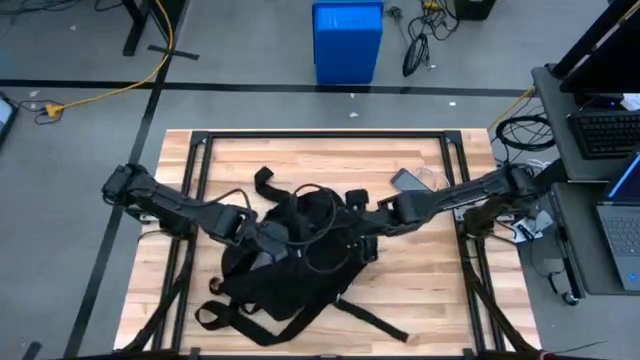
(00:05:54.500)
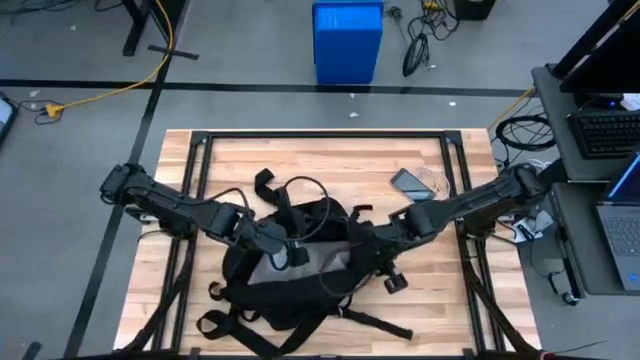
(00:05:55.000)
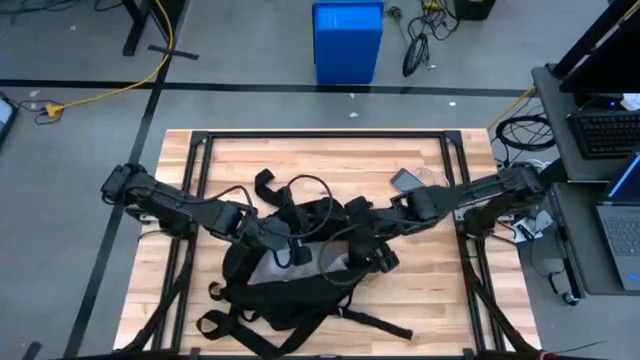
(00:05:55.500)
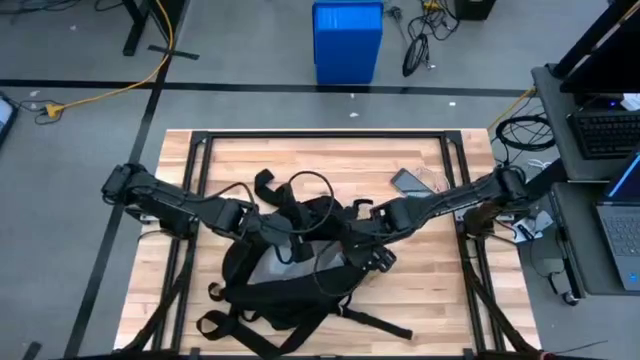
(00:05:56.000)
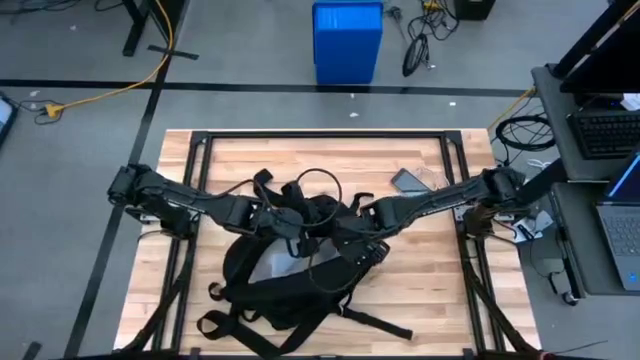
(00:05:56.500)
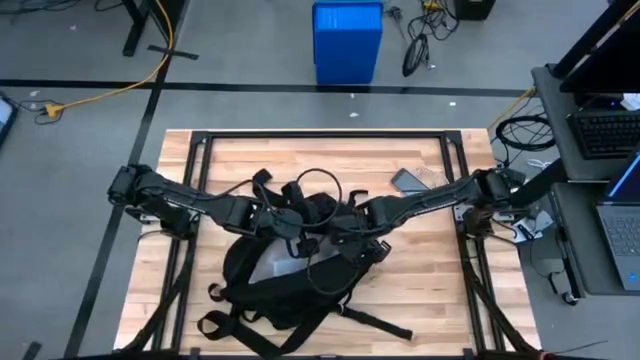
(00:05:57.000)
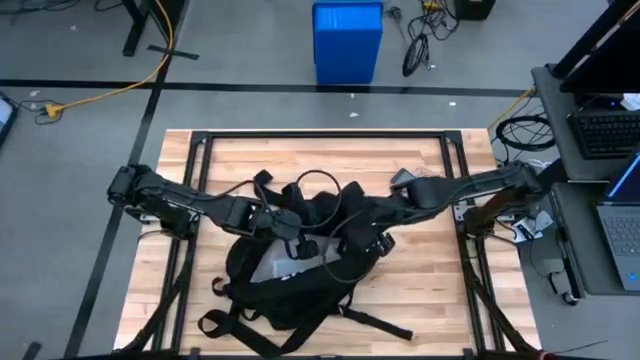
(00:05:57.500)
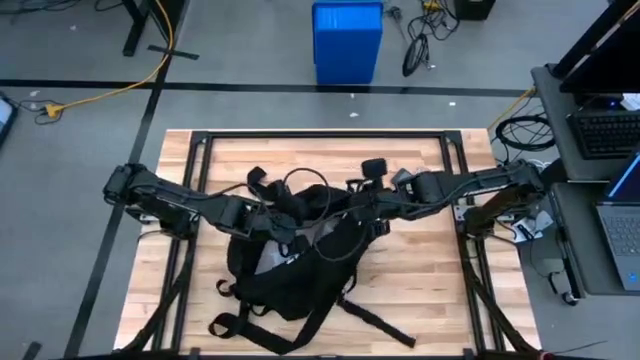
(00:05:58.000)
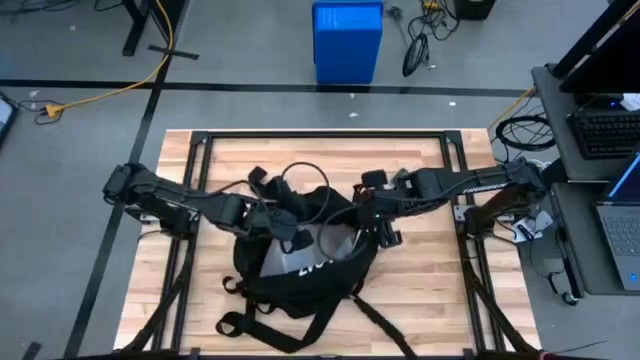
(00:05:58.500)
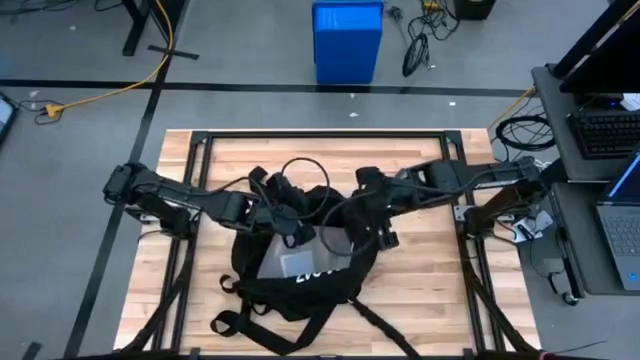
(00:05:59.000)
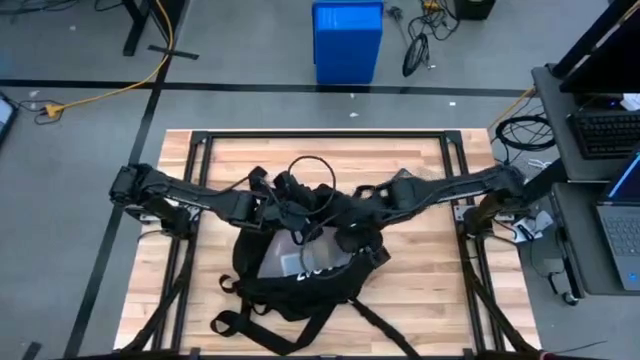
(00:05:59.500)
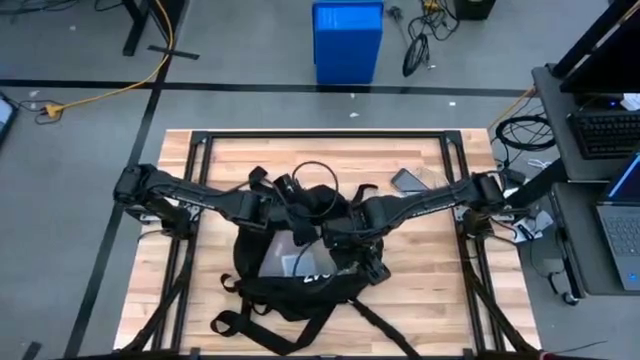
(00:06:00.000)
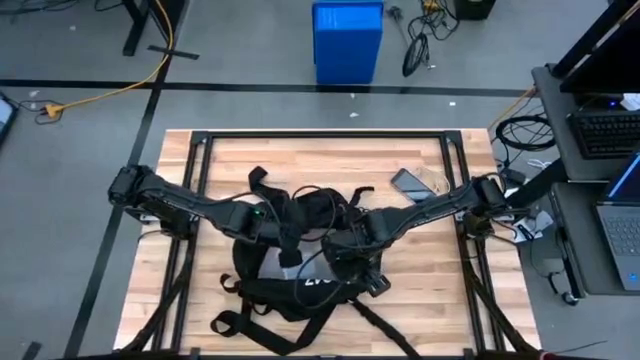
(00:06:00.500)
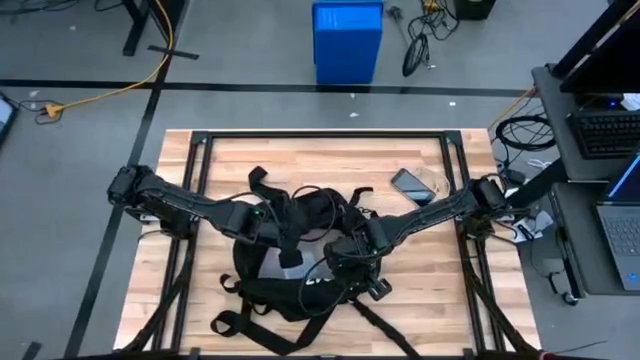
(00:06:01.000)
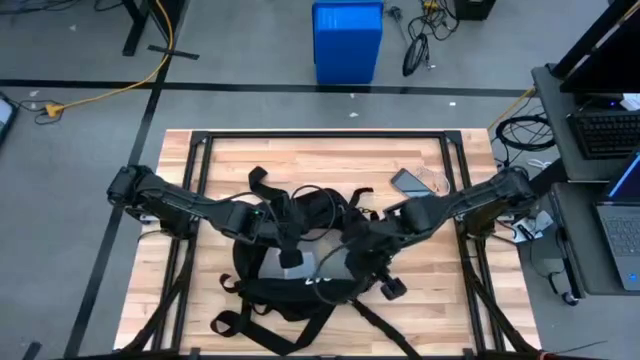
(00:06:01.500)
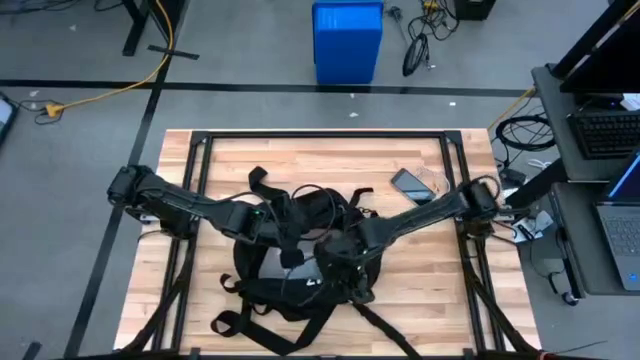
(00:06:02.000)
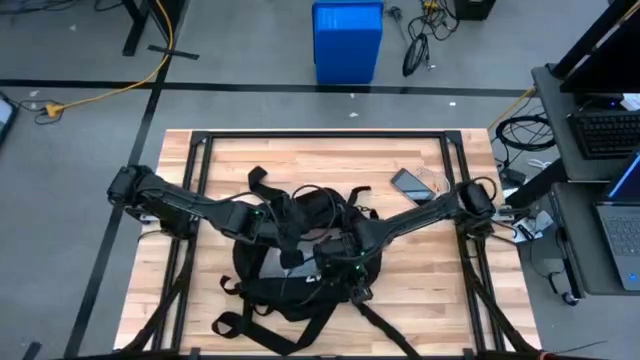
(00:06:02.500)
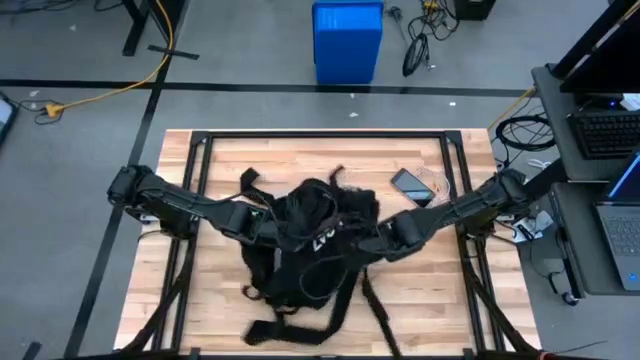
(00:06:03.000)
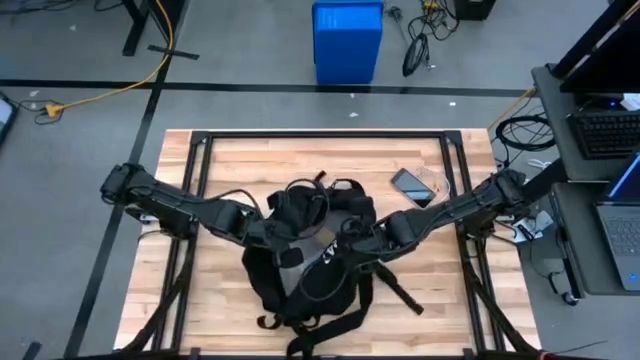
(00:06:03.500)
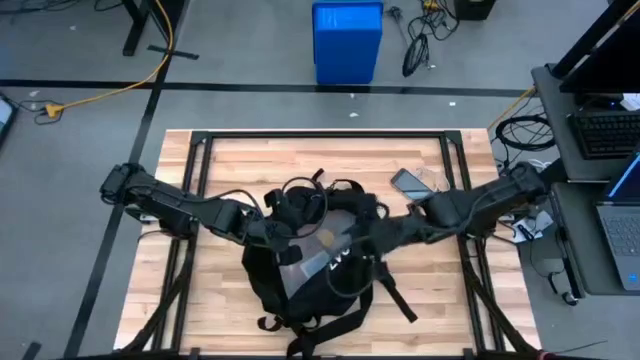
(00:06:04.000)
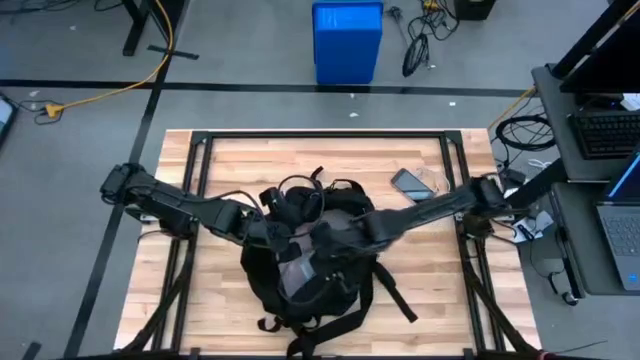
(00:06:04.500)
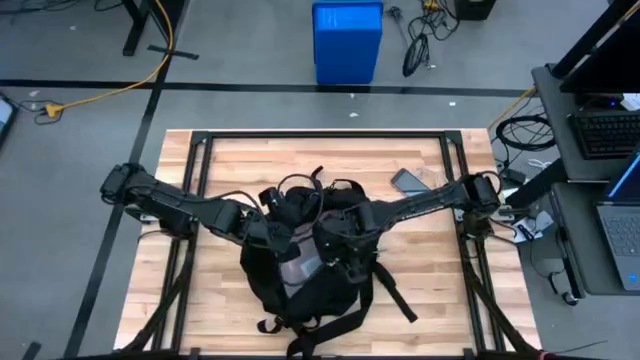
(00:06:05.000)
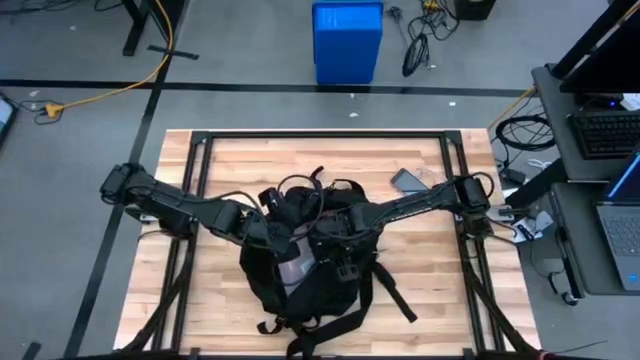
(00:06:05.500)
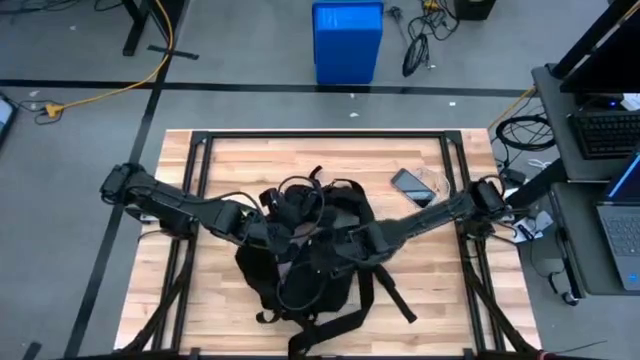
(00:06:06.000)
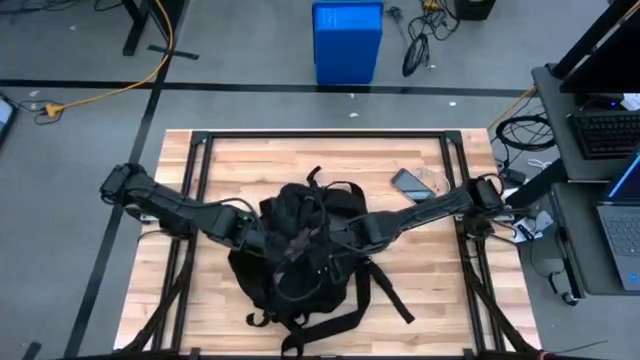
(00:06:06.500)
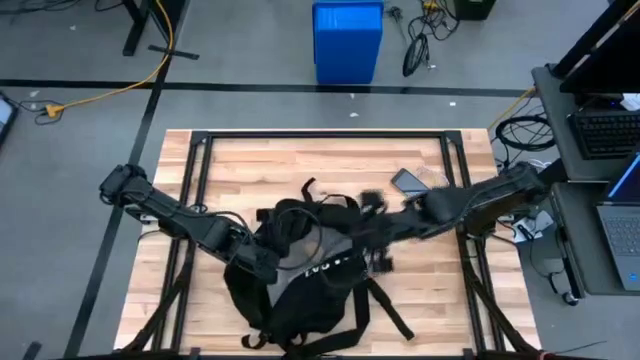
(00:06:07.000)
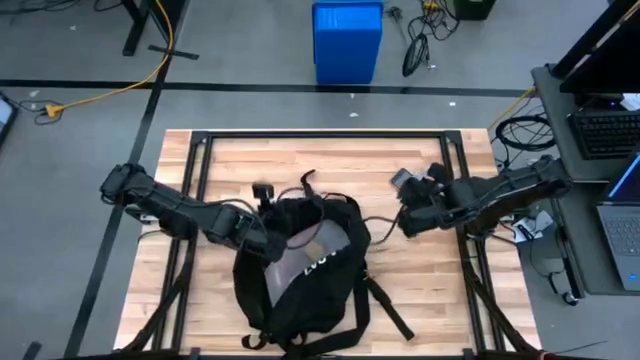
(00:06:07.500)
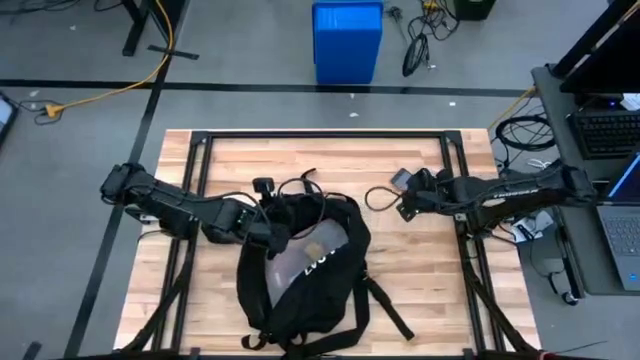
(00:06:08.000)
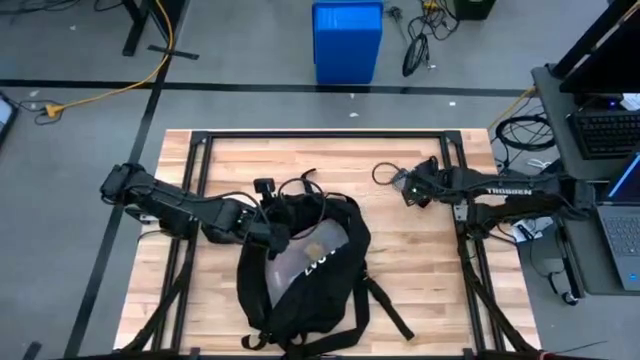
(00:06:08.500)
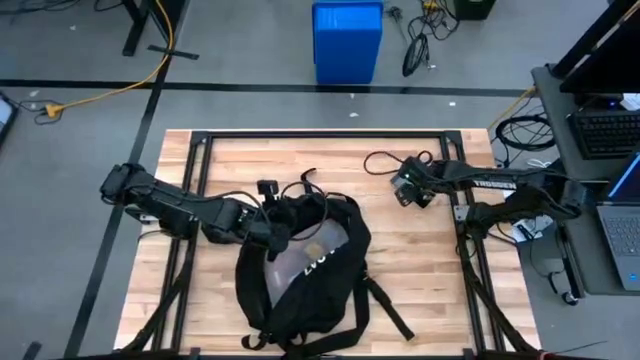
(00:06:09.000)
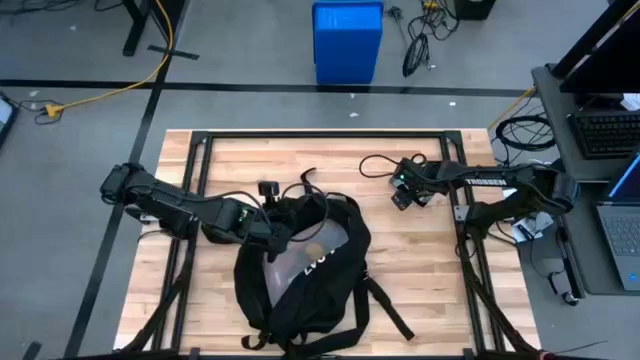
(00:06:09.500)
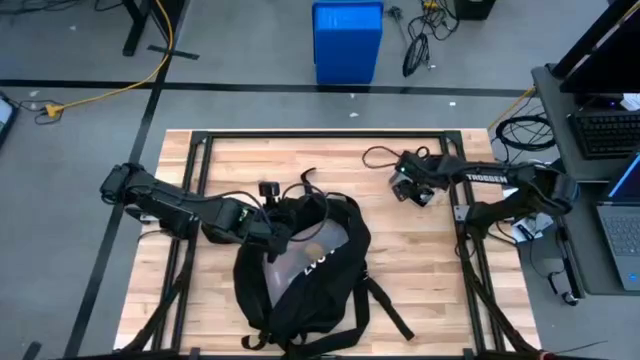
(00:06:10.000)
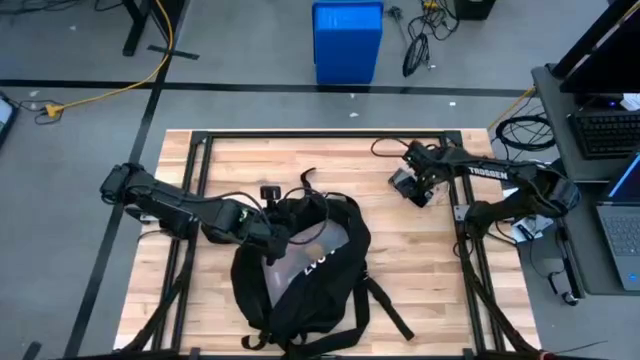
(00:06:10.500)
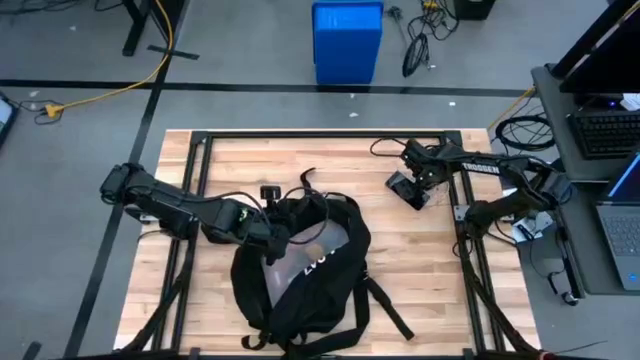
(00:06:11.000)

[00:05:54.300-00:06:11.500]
Task: Unpack backpack
Put the charger cable into the black backpack

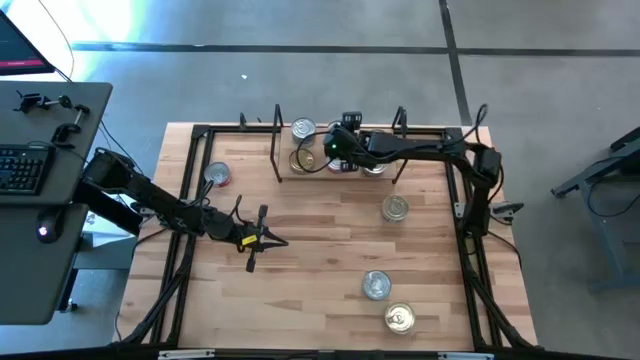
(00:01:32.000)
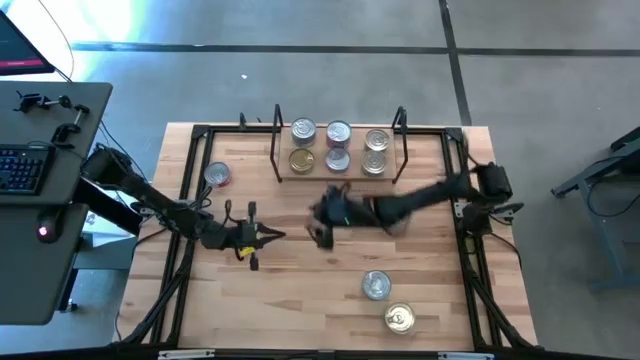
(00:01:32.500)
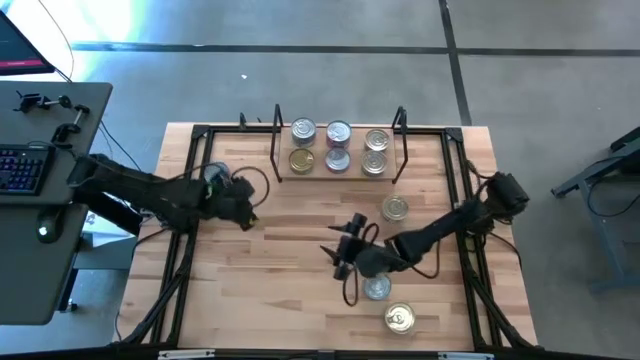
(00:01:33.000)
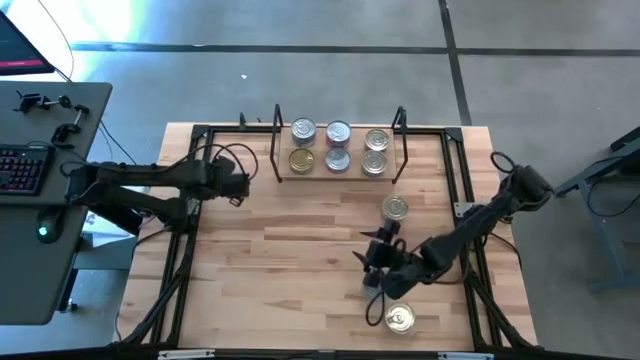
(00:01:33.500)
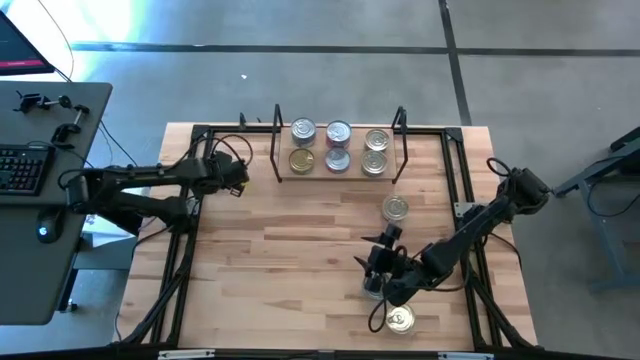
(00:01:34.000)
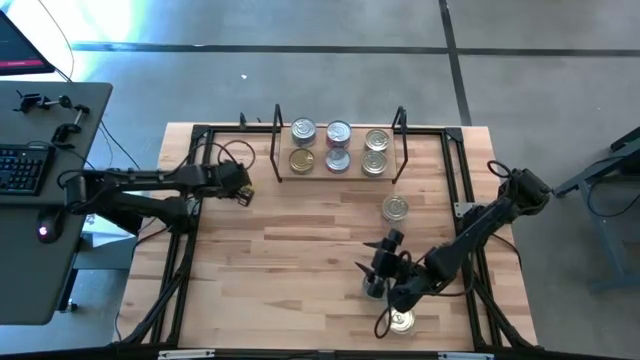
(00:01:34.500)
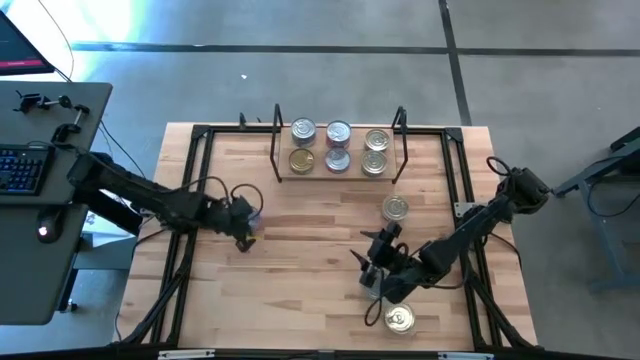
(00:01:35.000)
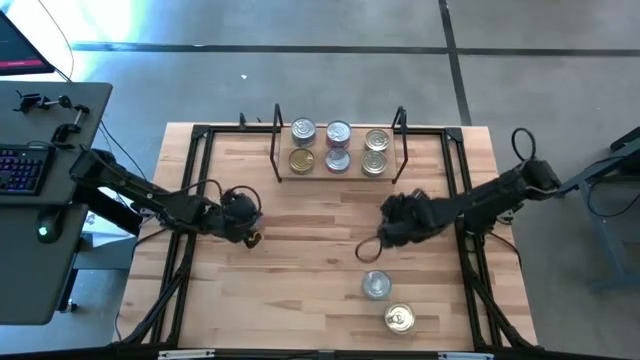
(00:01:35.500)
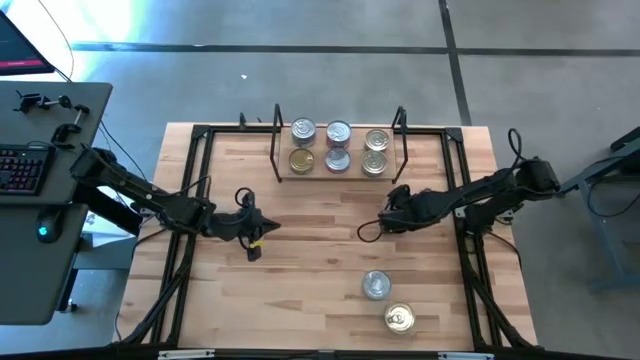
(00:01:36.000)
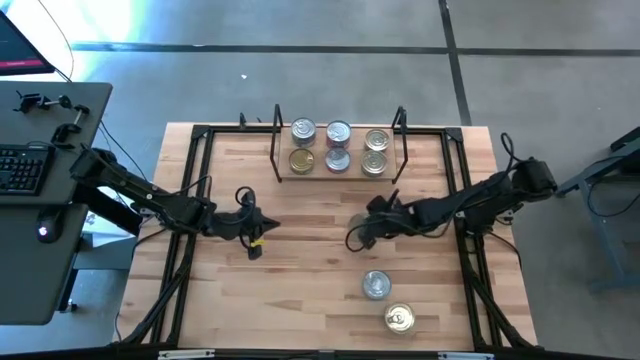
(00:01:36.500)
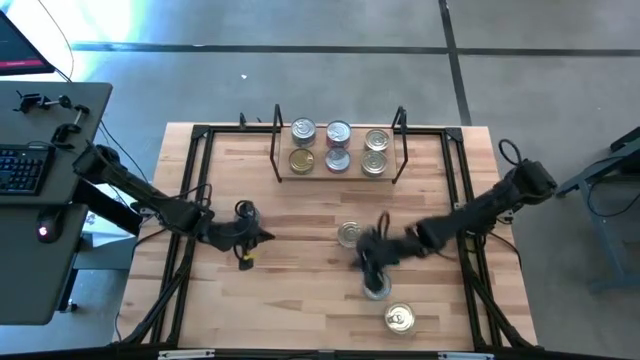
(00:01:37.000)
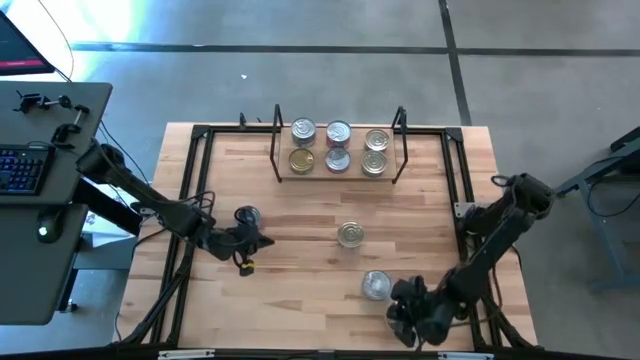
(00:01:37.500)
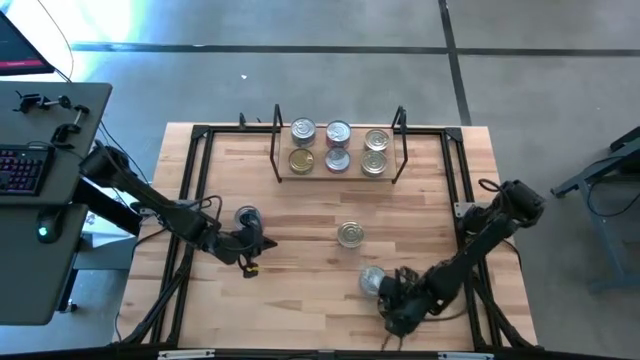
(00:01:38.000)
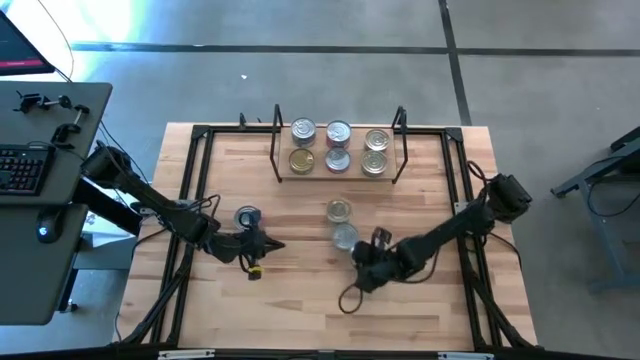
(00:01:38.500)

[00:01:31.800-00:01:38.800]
Task: Stack canned seafood by type on shelf
Move the tuna cans closer to the center of the table
